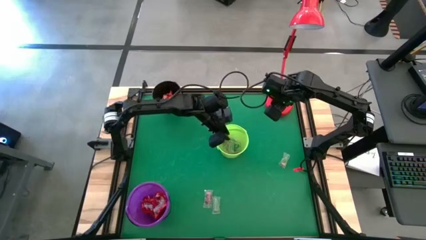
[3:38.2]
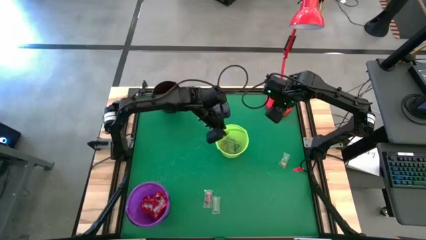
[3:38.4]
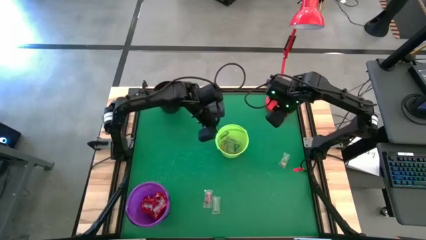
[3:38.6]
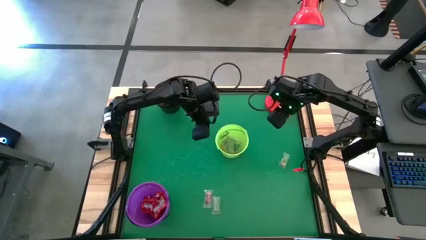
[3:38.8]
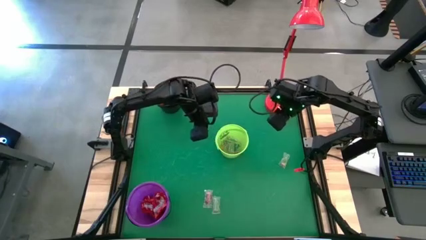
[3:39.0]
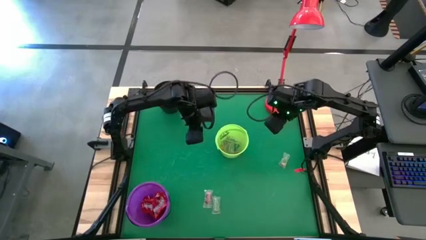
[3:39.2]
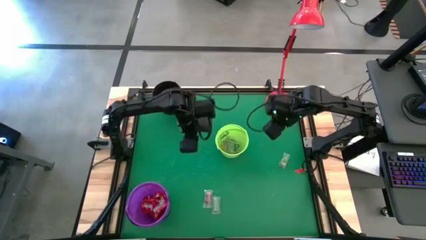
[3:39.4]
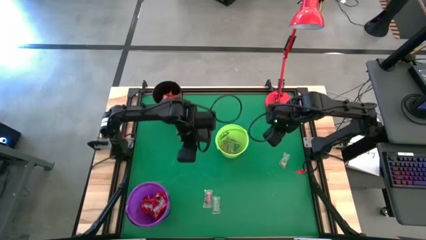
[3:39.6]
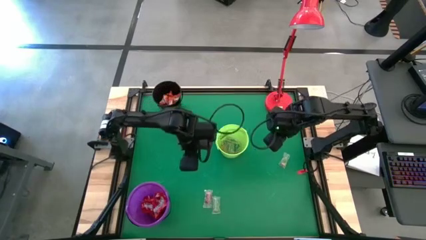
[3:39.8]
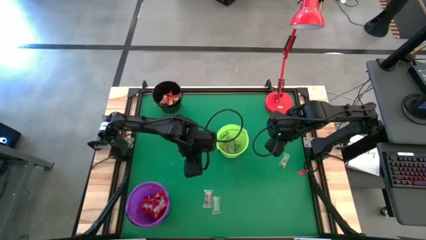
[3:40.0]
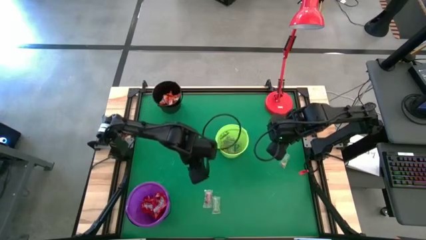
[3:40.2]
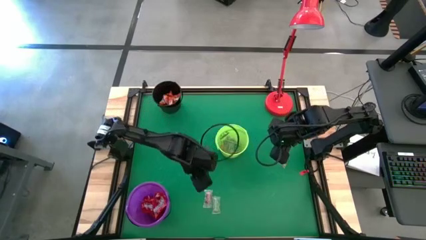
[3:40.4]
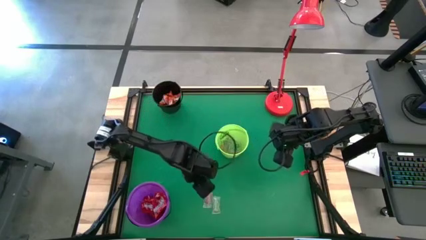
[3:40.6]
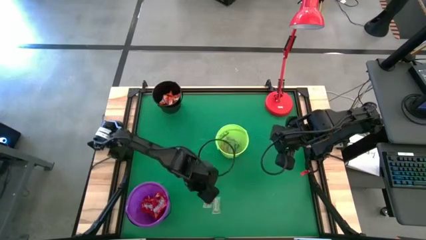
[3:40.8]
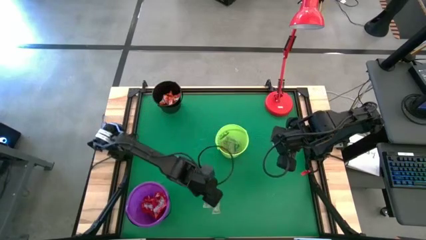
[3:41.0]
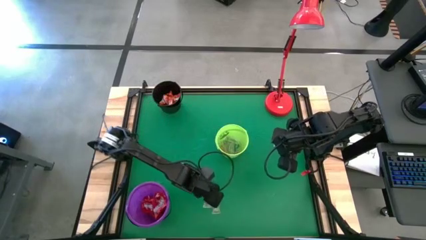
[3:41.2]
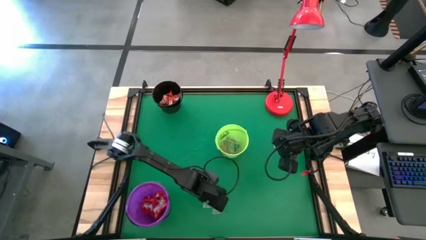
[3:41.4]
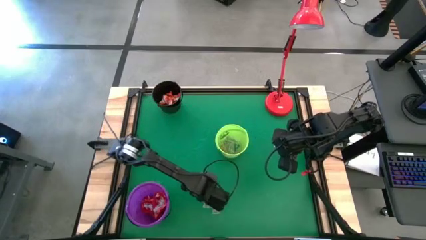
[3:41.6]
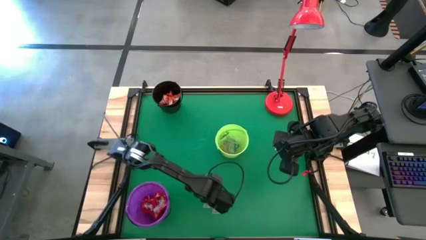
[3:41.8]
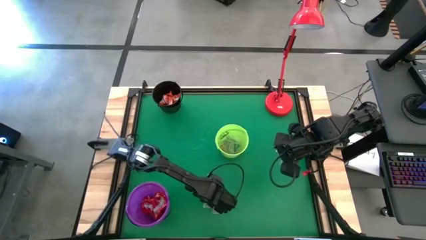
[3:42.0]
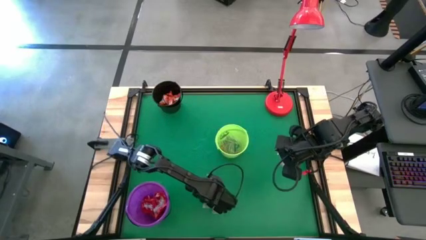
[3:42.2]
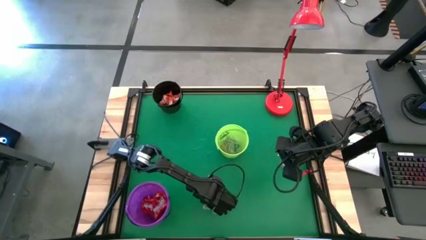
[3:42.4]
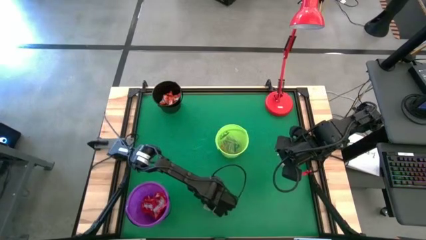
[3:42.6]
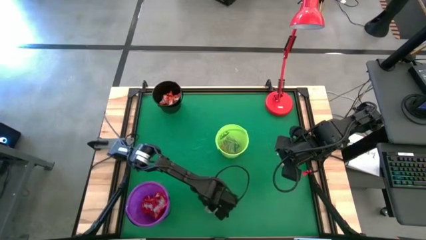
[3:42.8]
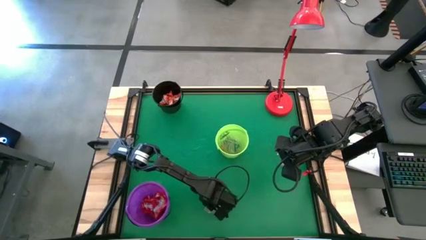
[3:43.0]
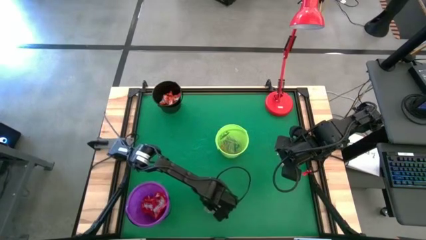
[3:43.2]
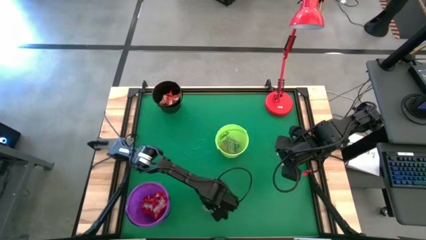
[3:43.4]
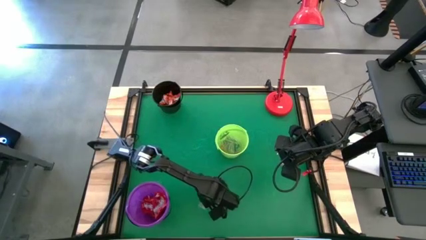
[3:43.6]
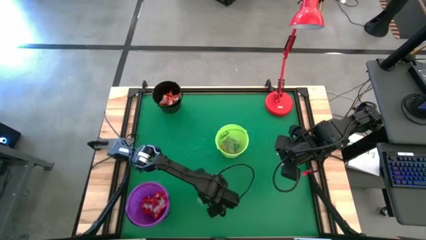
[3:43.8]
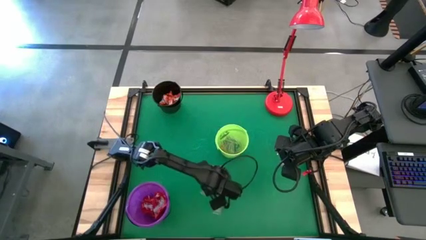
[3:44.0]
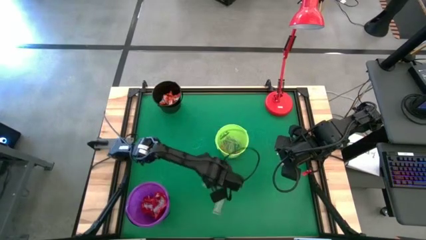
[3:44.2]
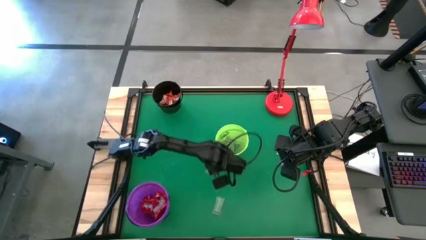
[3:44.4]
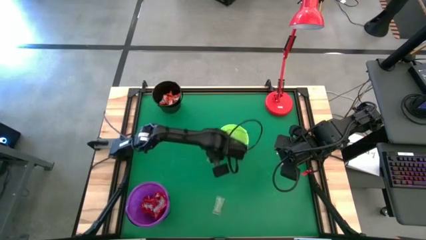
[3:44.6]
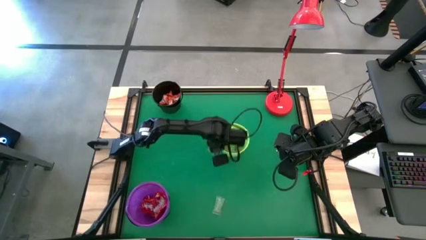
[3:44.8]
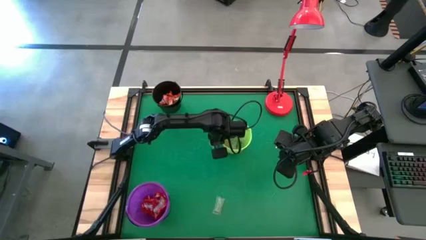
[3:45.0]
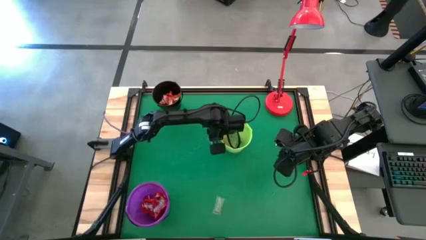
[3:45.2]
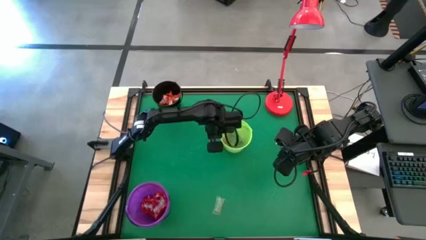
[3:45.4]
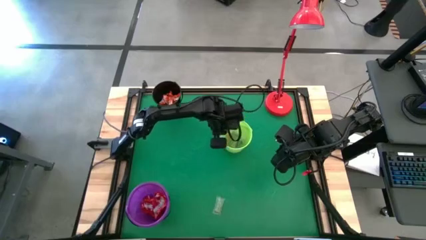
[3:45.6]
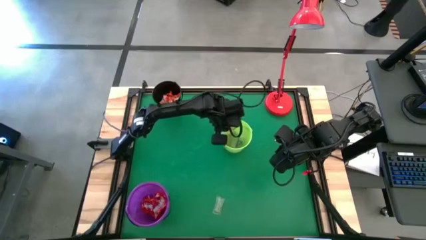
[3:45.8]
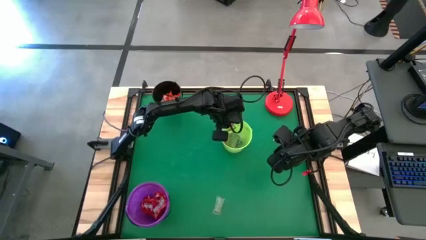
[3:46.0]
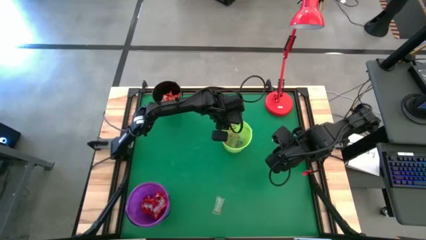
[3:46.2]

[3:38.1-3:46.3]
Task: Sort candy
Put the red gummy into the green bucket

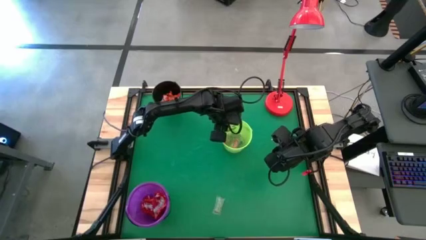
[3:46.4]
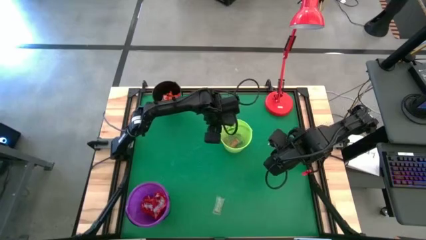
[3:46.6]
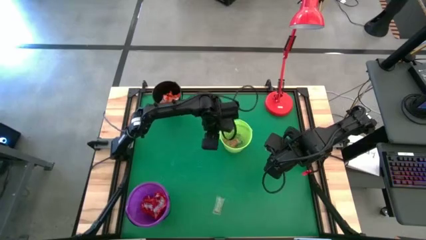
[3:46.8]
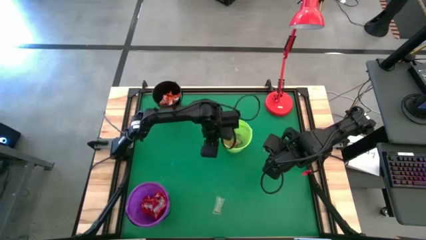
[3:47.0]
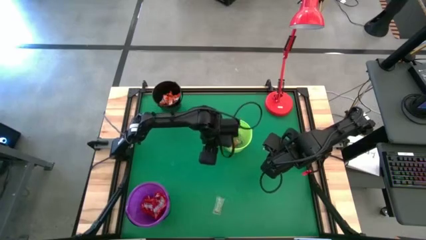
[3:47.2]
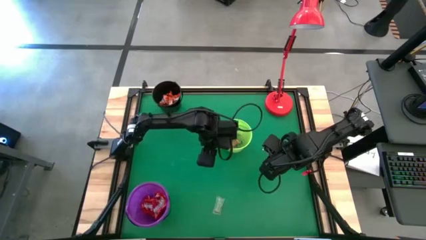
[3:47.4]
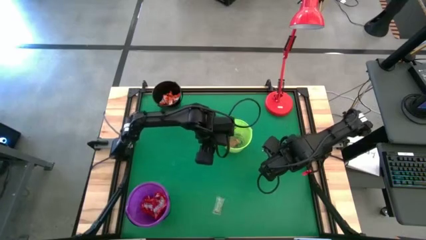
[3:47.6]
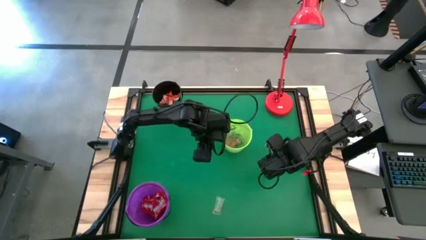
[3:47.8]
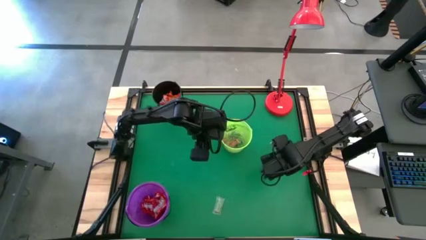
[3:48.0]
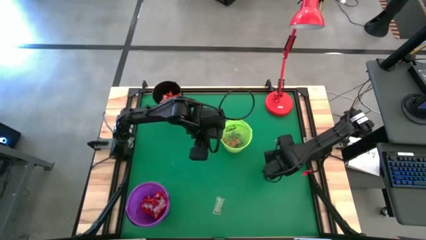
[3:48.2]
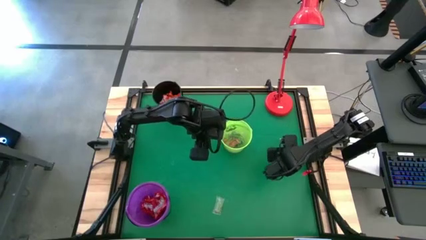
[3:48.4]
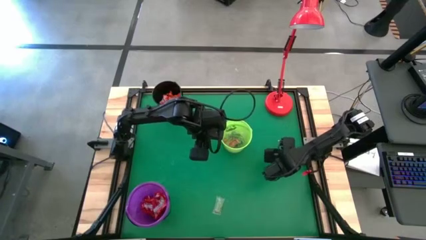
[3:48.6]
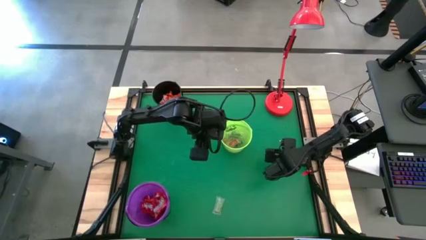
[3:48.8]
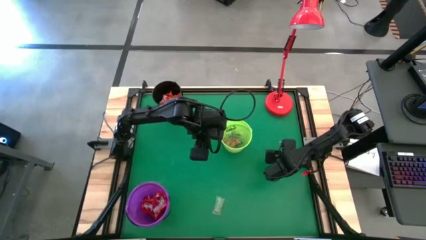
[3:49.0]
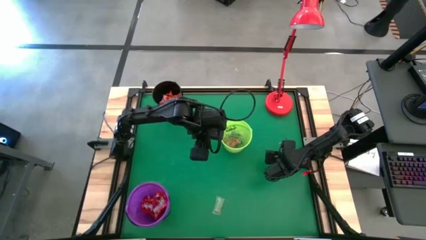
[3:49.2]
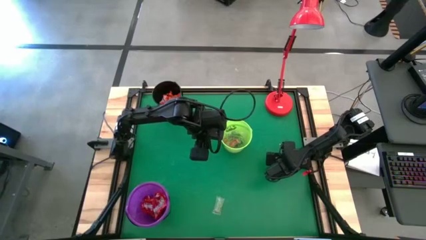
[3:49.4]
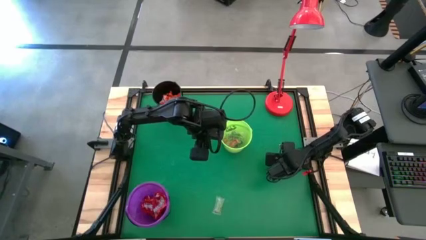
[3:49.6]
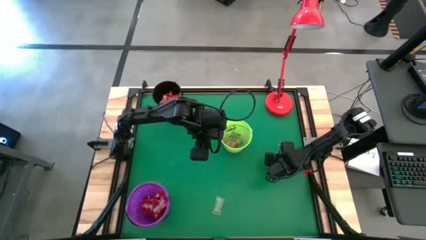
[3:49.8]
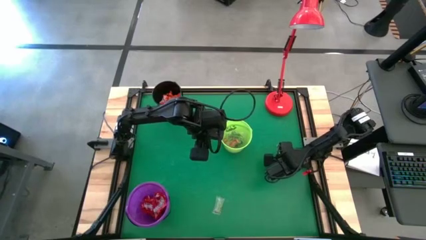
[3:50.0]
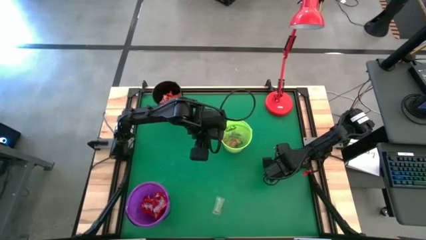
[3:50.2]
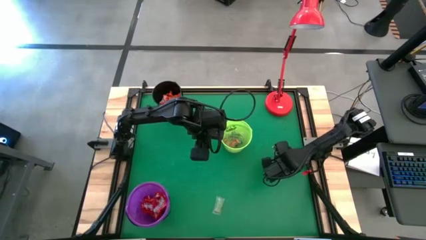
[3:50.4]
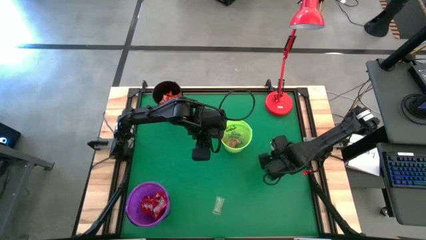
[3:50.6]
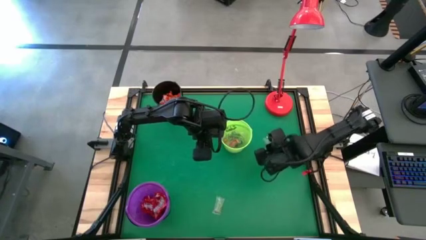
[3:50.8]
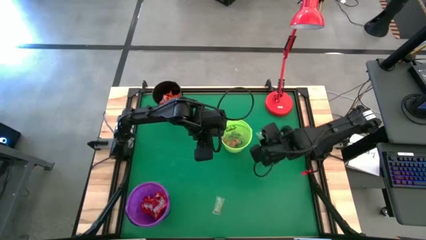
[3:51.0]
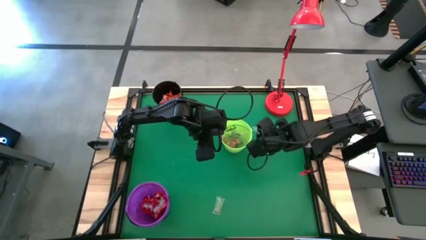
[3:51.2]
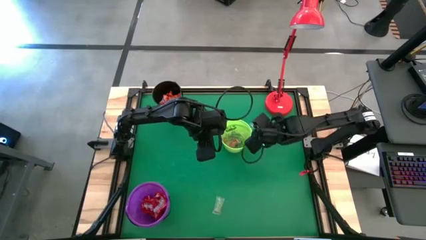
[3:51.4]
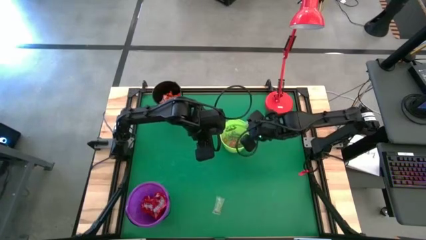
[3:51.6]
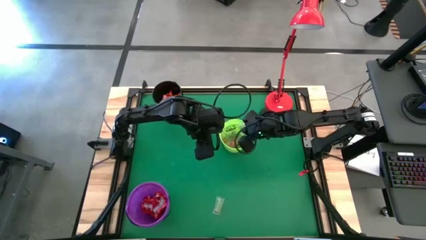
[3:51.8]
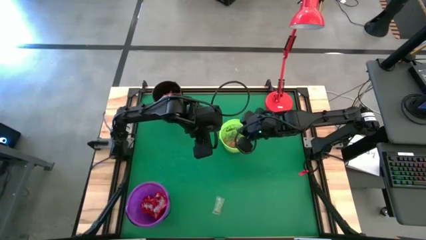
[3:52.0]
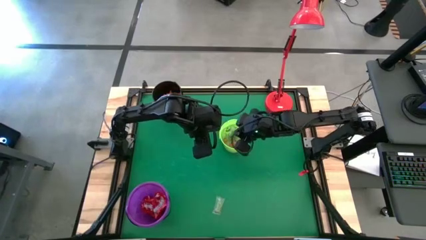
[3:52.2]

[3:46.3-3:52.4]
Put the green gummy into the green bucket

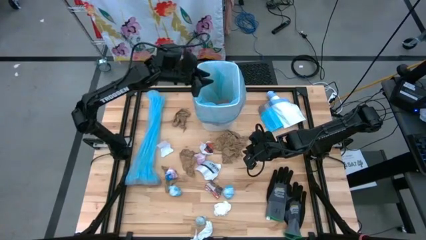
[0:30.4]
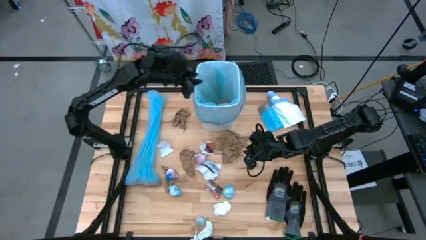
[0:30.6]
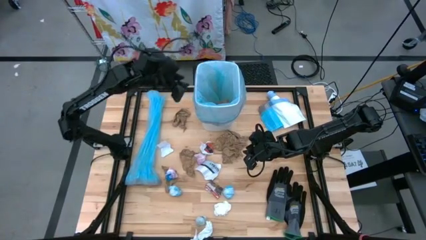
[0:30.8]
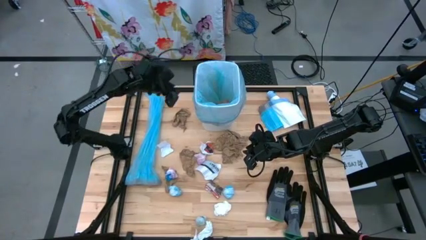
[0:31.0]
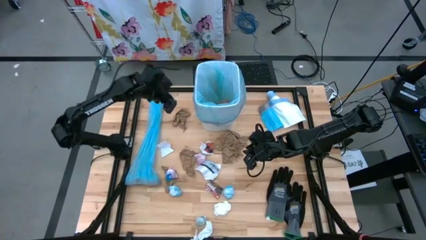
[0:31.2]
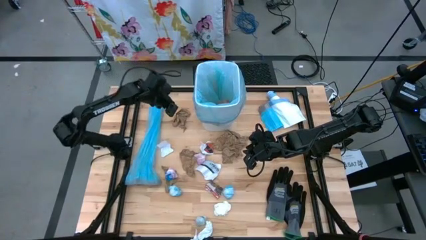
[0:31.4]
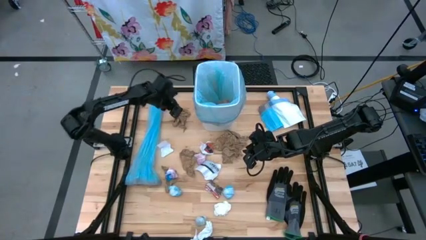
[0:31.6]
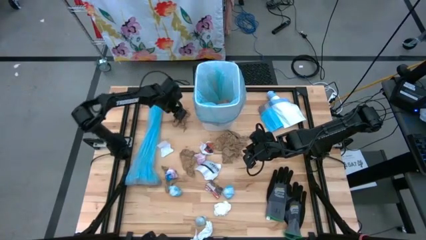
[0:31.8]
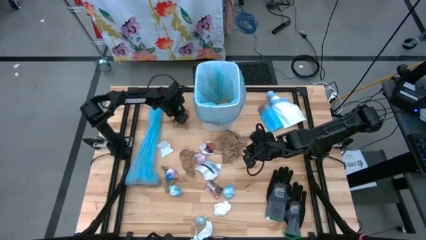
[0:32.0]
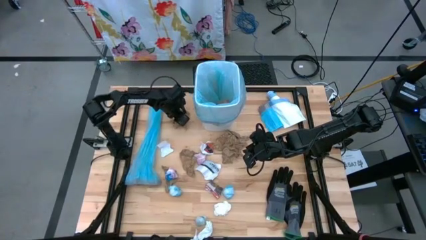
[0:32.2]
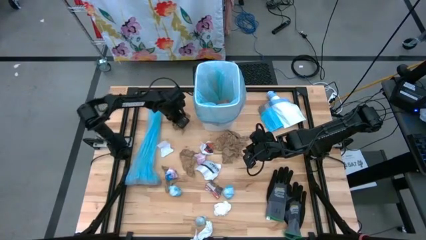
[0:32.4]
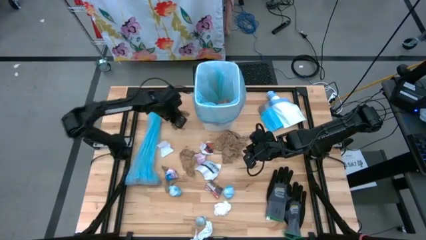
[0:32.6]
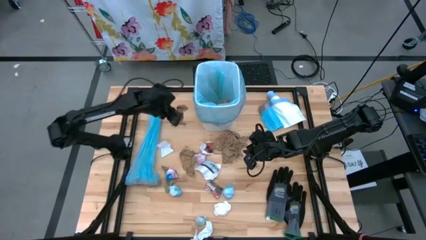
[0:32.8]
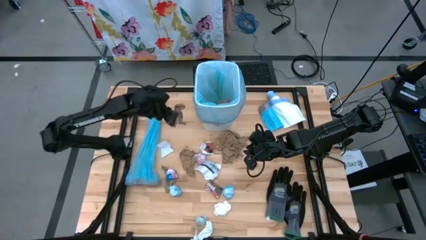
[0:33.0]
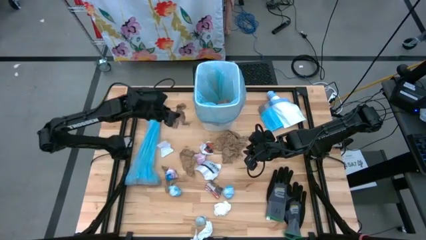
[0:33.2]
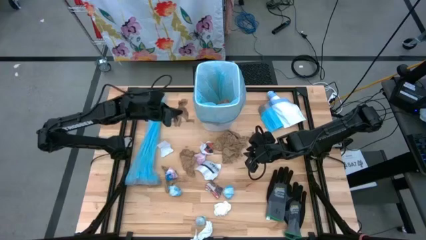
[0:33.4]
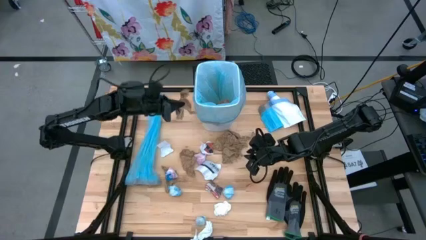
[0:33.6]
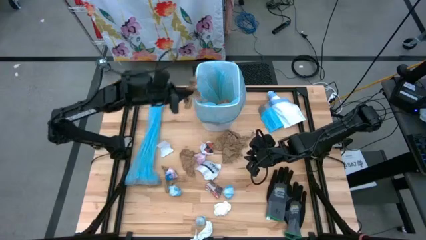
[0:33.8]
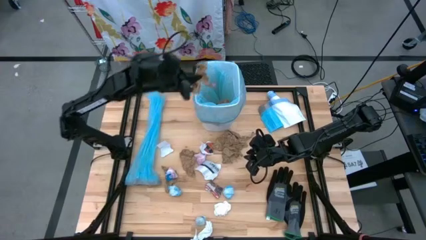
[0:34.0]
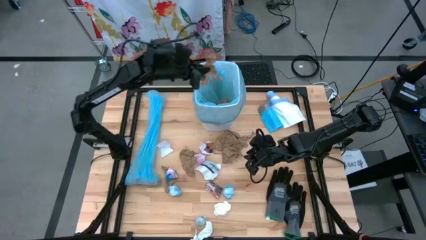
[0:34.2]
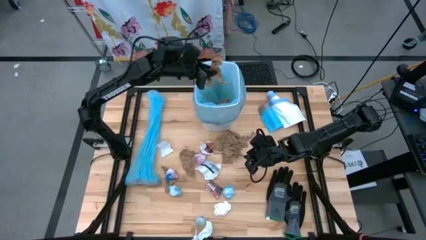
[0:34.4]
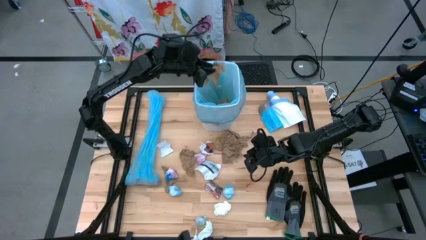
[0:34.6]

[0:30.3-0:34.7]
Task: place trash/remove bag and relplace
Put the brown paper into the blue trash bag inside the white trash bin
